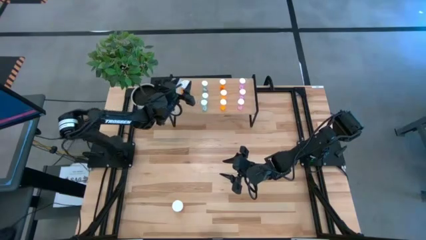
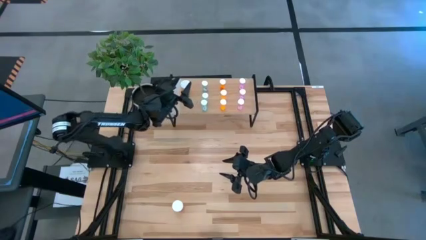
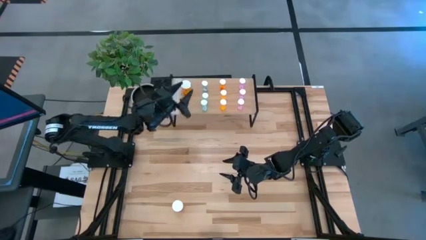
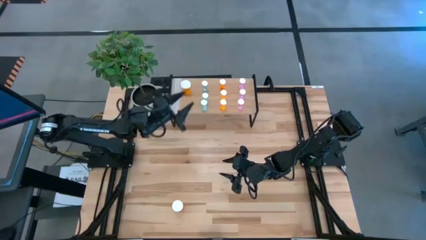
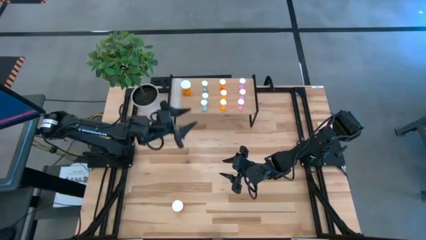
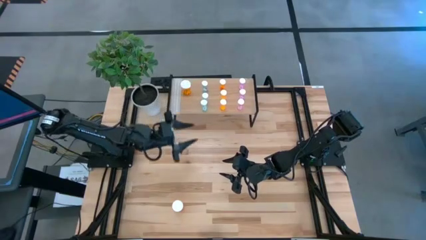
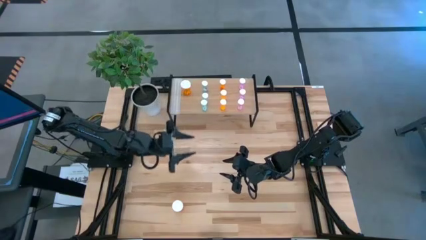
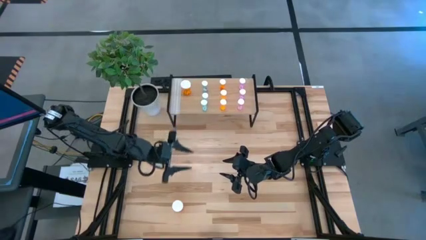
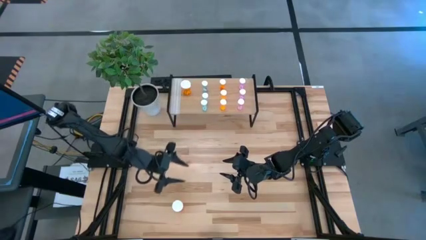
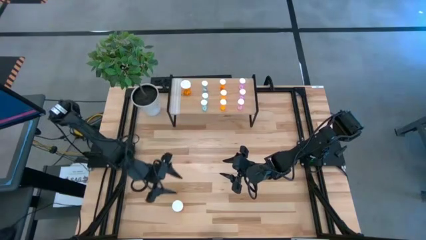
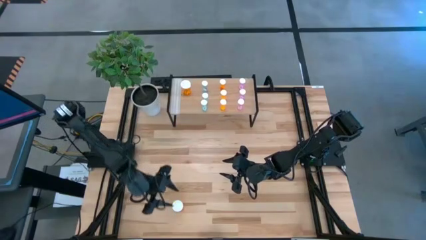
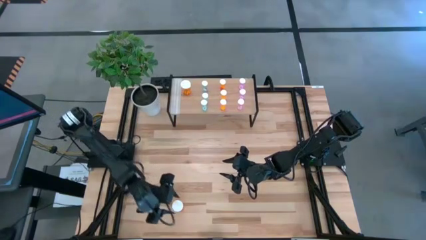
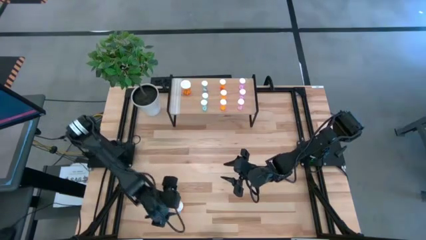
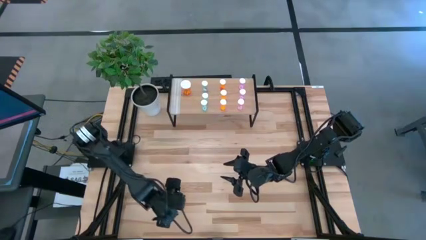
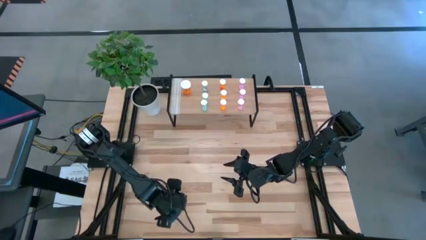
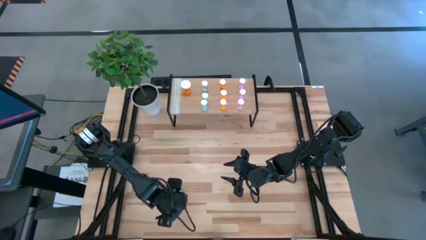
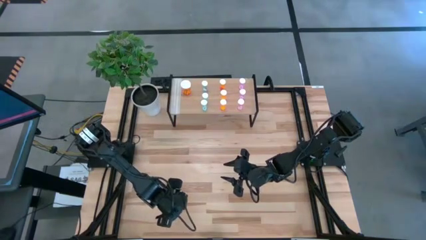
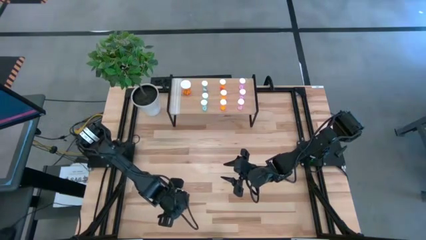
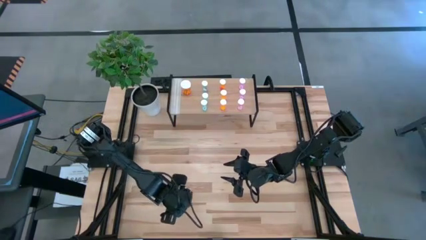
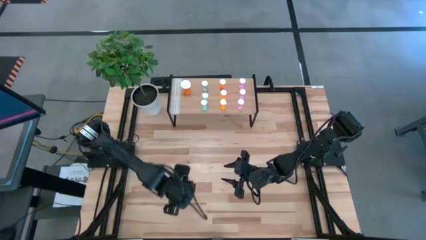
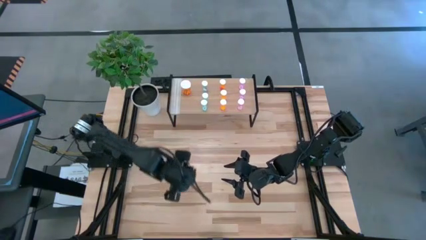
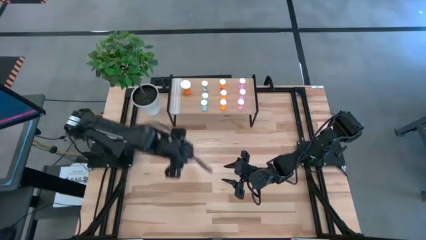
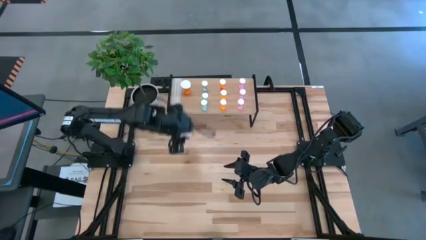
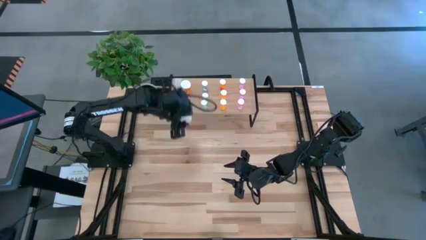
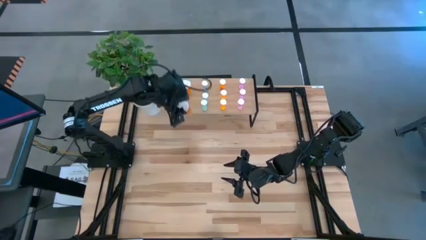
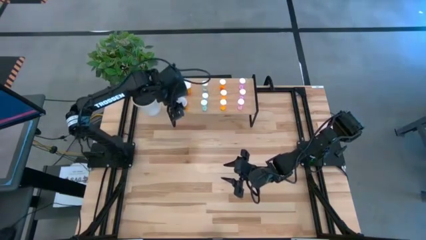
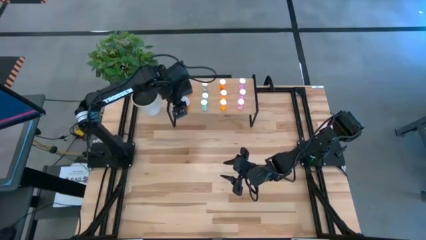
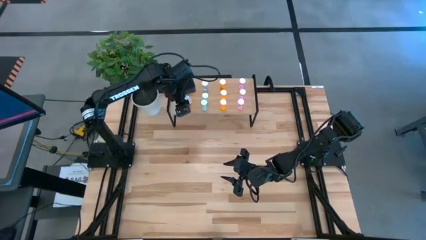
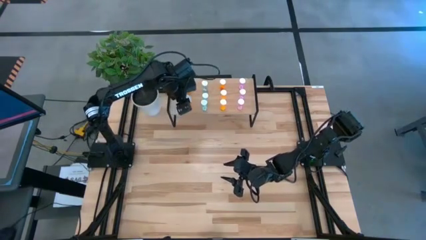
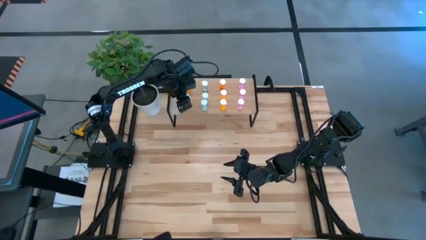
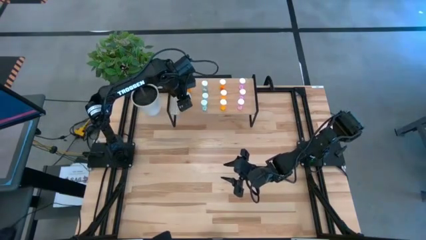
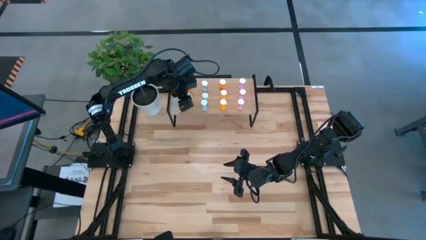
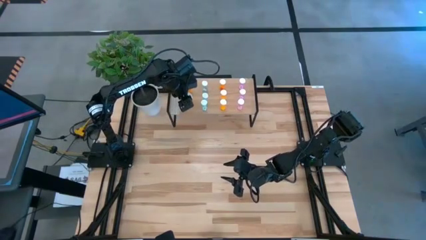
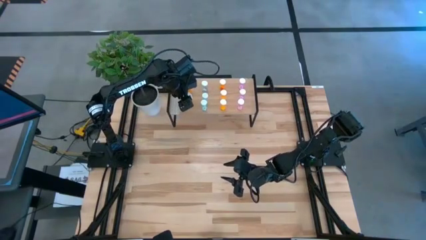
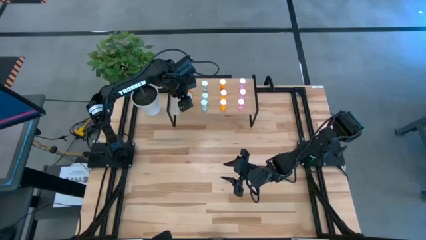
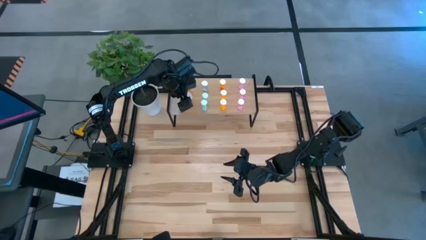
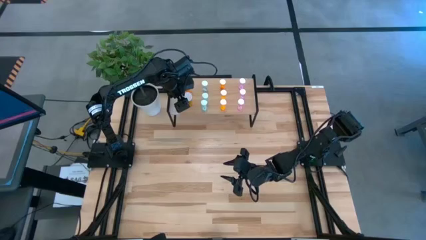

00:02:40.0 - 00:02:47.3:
Task: Pick and place medicine bottles onto shelf by color
Put the large orange pill bottle on the shelf aligned with the other large orange pill bottle

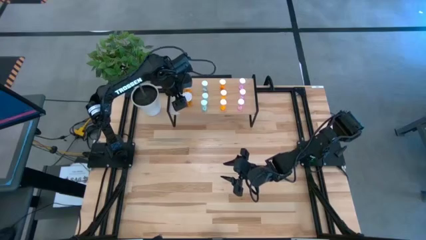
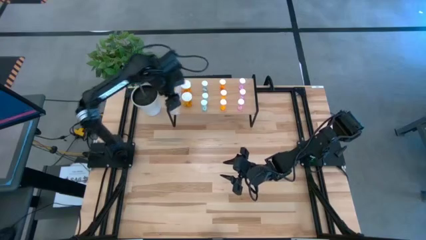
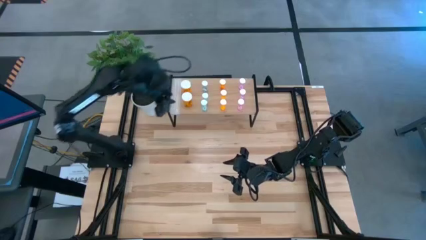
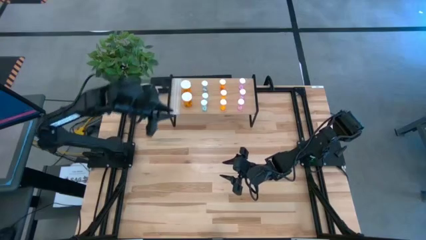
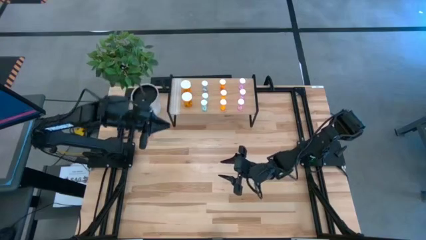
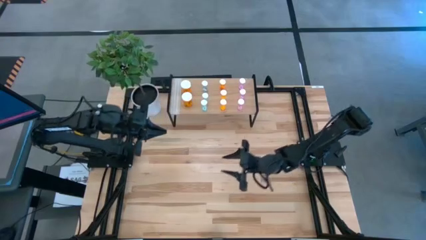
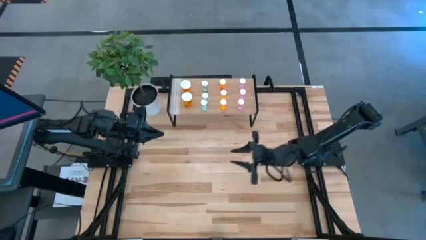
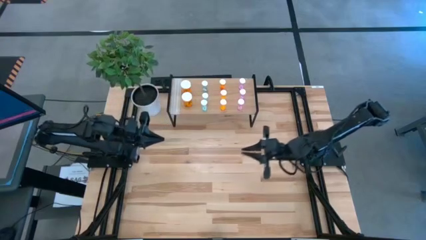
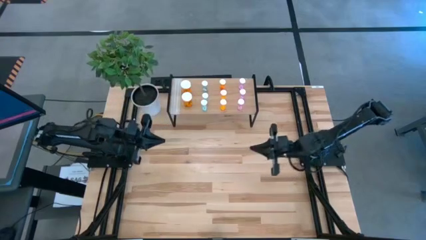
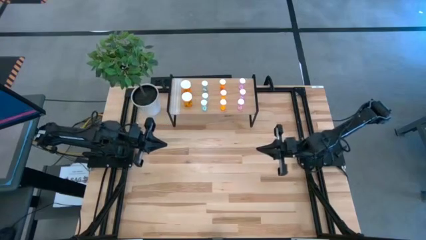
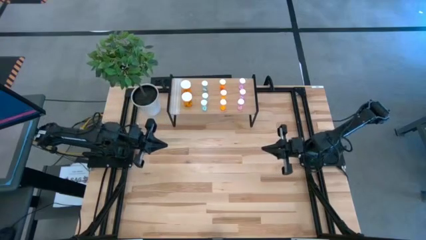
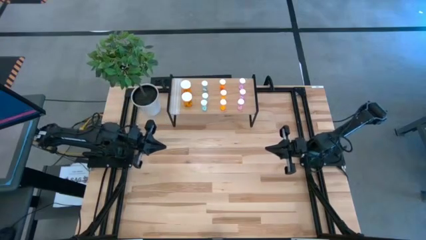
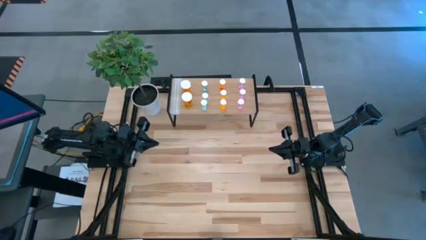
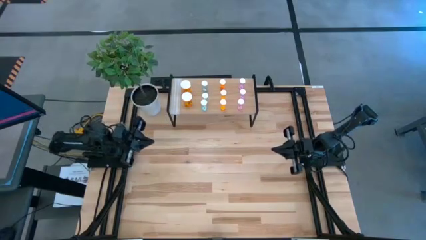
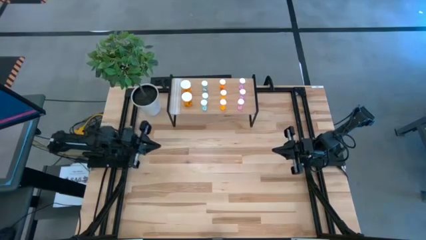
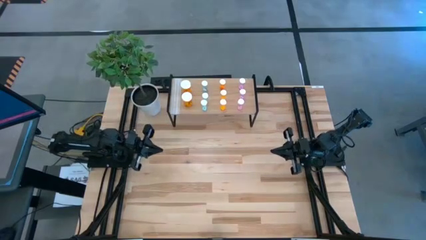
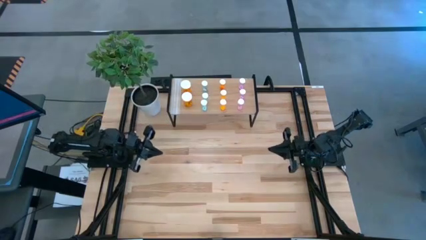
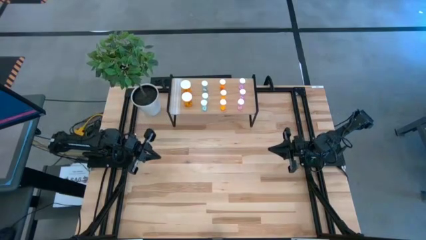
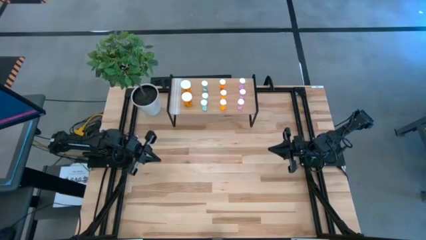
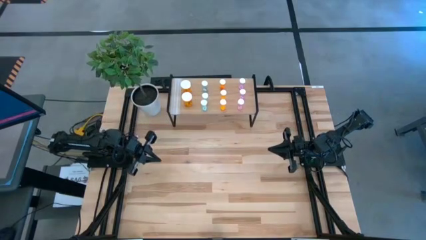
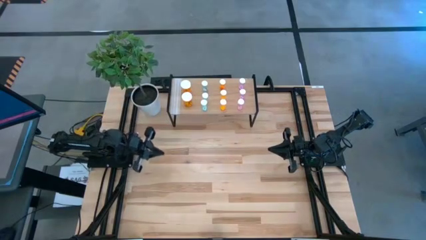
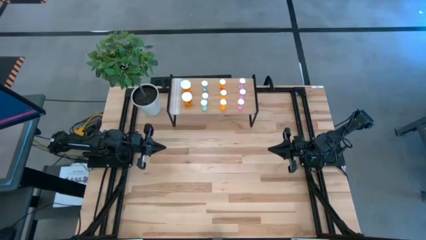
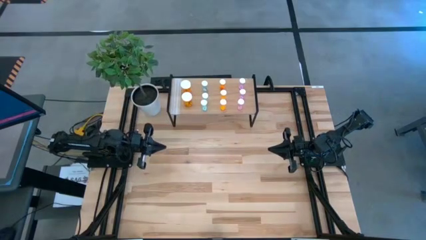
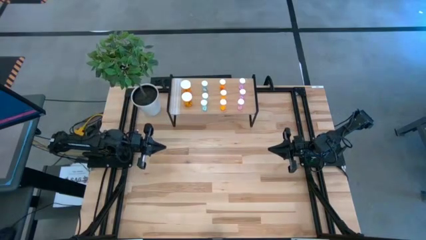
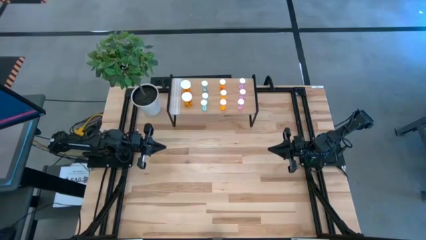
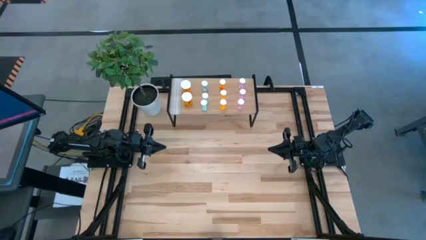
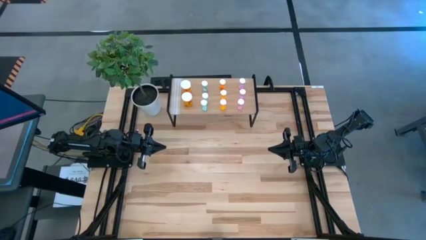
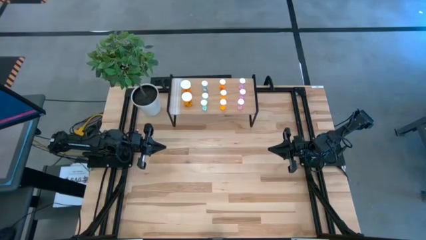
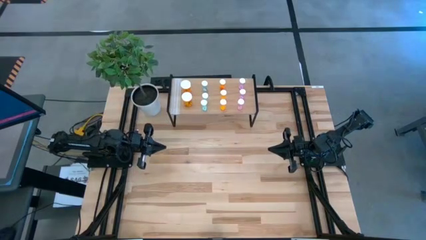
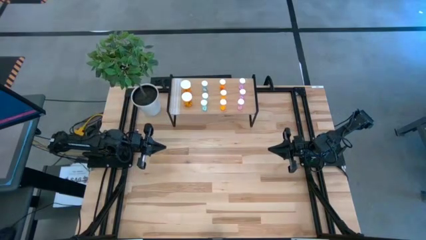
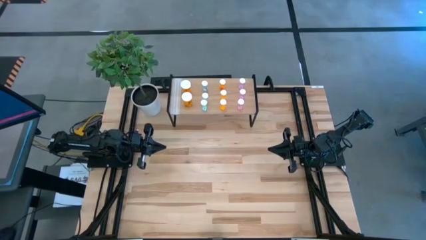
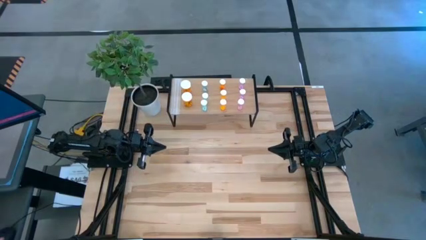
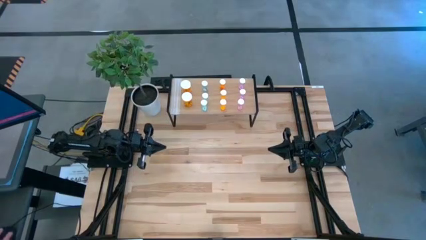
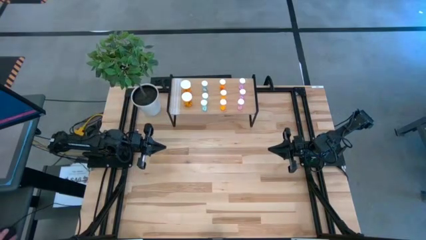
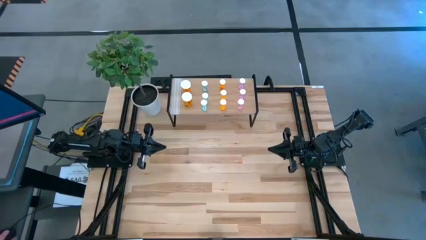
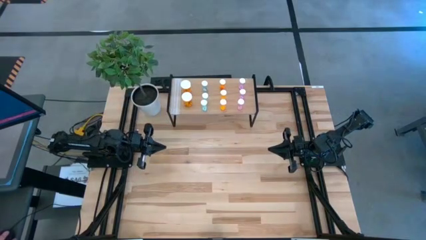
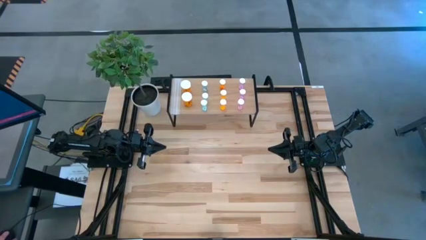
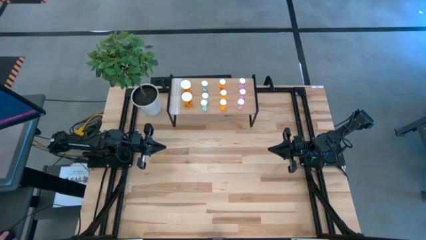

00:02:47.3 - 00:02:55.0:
Return to Home Position

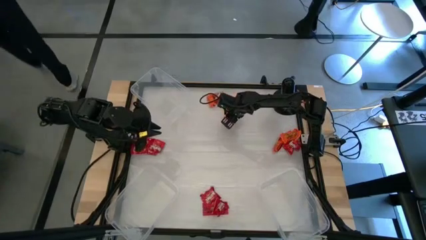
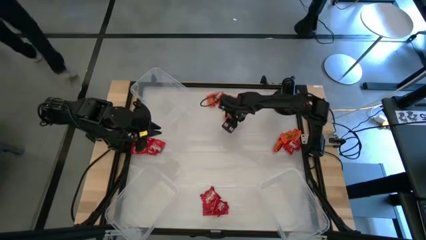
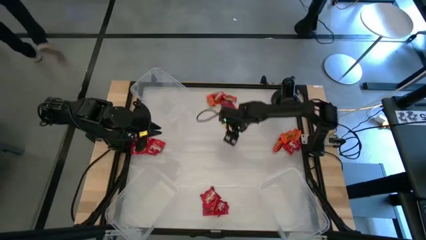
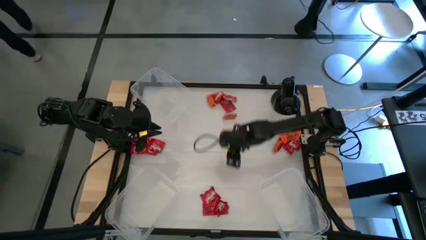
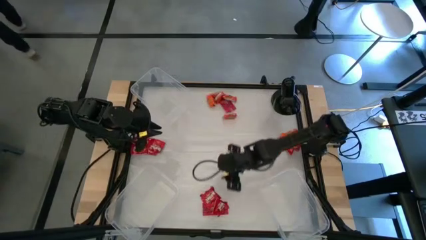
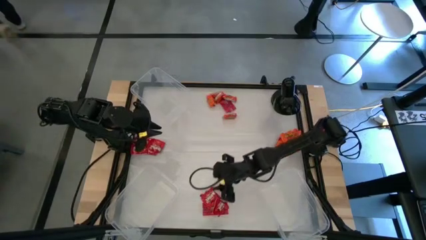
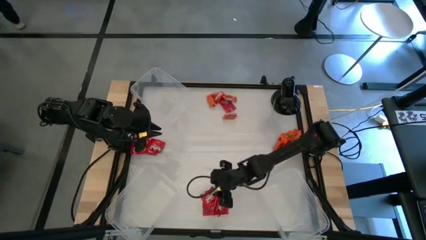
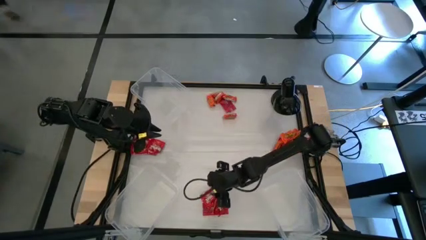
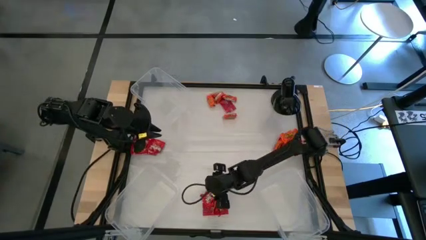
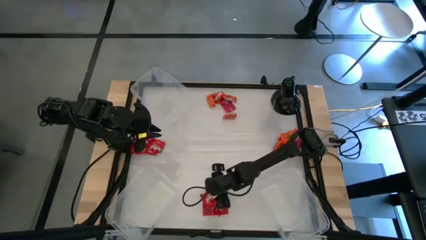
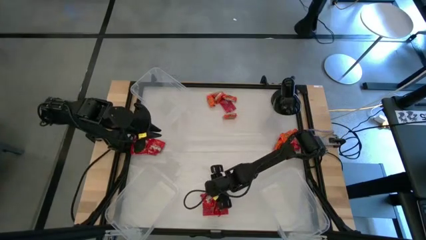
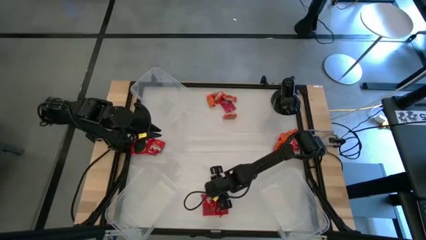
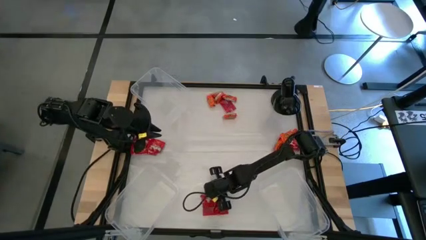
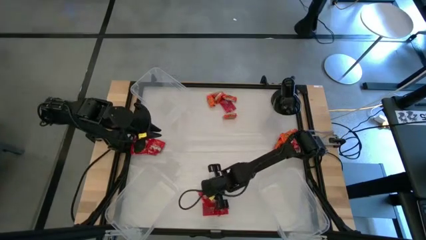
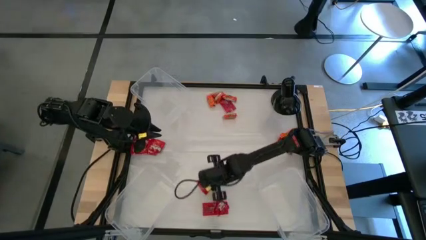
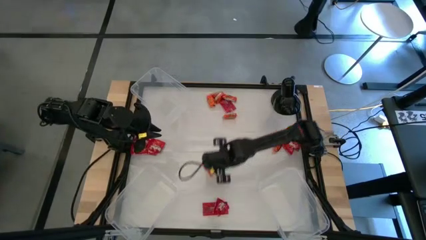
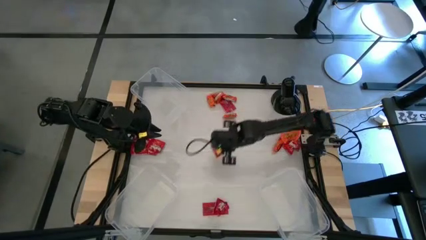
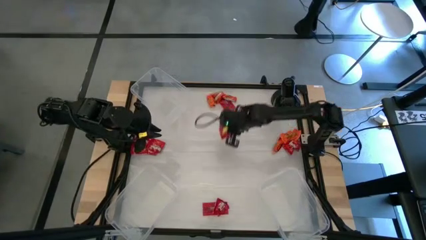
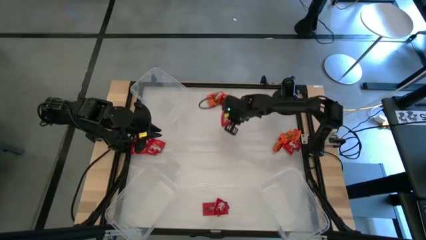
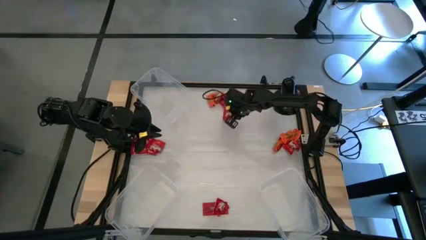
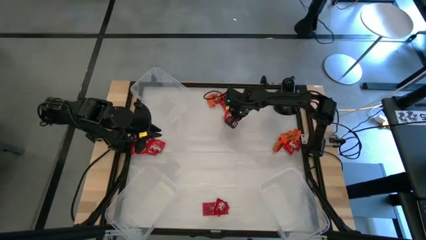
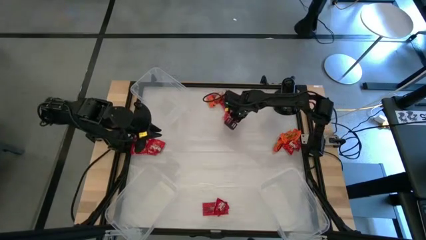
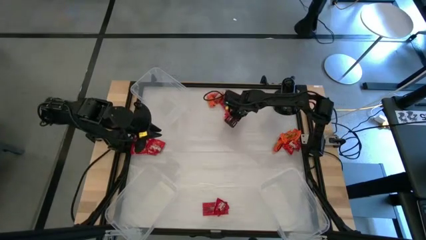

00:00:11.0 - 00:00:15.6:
Task: Sort candy
Move the red candy to the top center of the table
